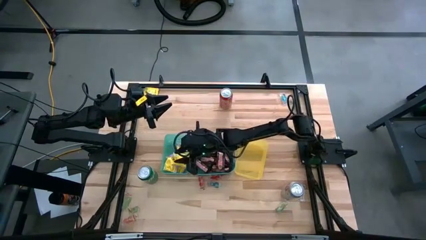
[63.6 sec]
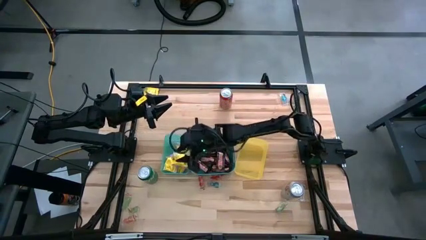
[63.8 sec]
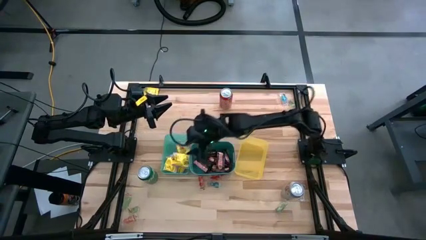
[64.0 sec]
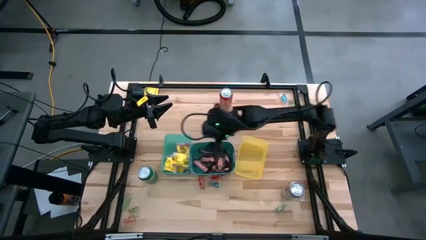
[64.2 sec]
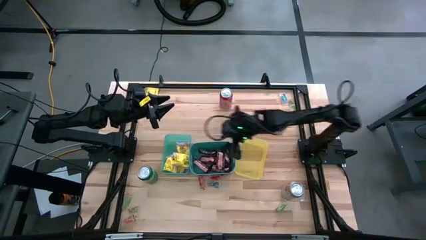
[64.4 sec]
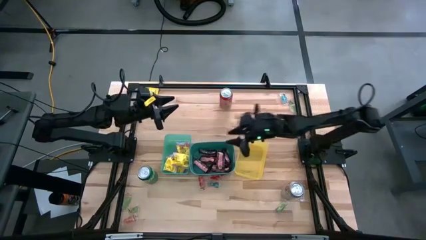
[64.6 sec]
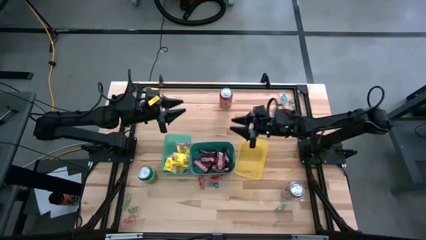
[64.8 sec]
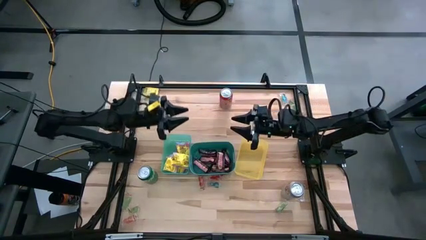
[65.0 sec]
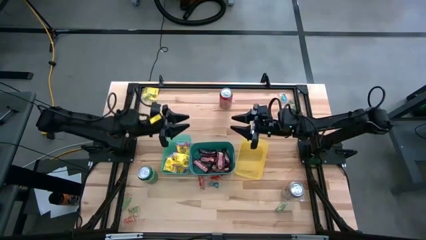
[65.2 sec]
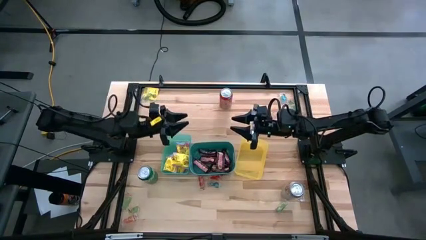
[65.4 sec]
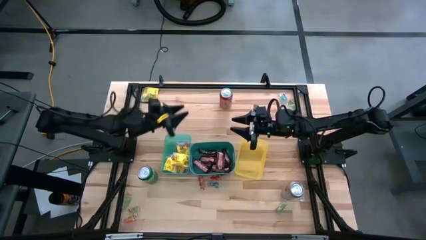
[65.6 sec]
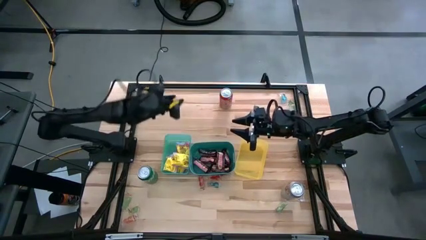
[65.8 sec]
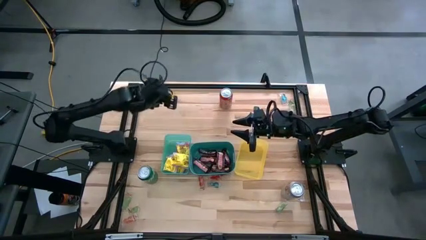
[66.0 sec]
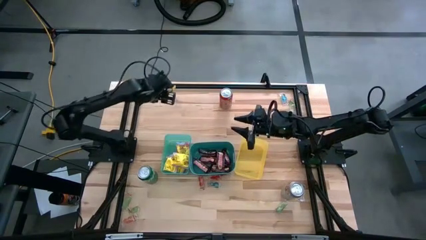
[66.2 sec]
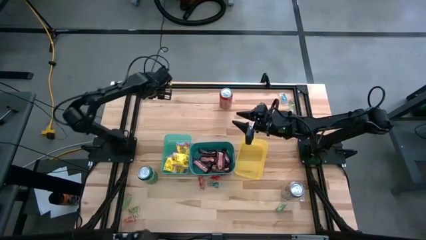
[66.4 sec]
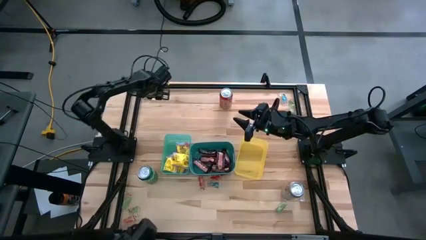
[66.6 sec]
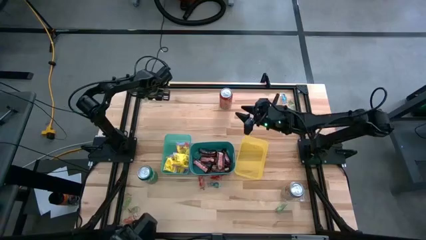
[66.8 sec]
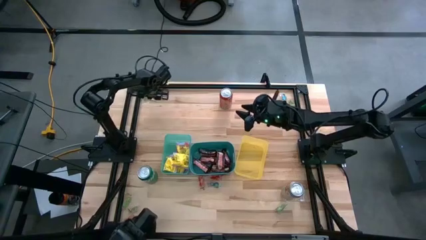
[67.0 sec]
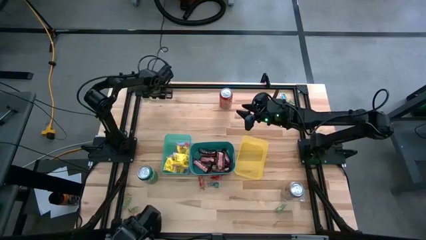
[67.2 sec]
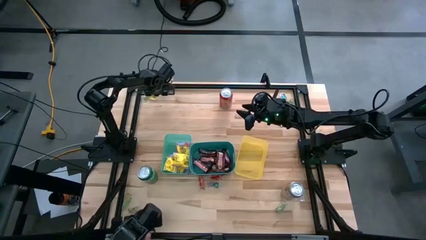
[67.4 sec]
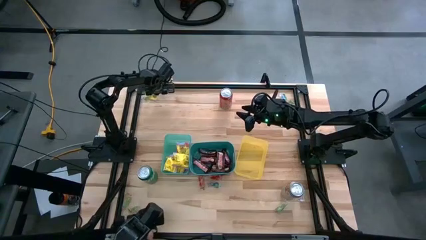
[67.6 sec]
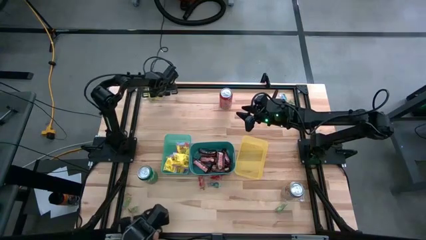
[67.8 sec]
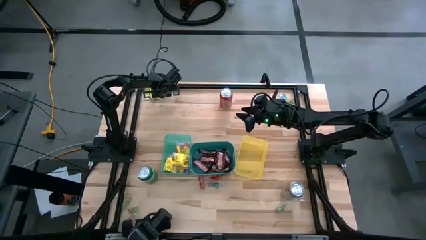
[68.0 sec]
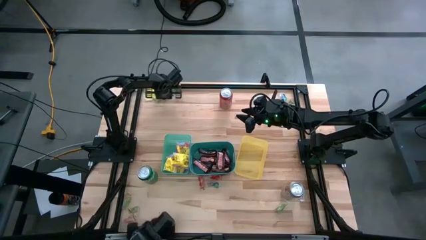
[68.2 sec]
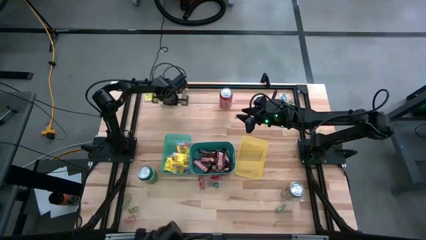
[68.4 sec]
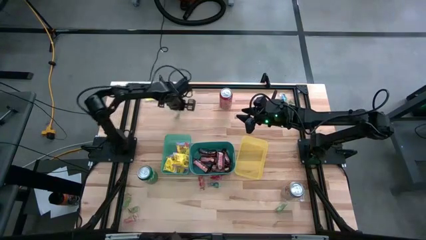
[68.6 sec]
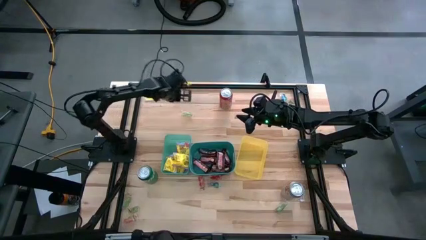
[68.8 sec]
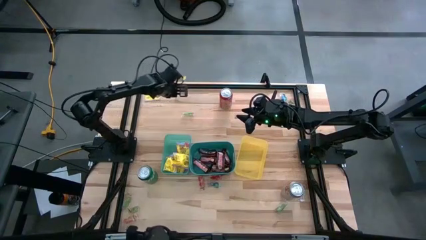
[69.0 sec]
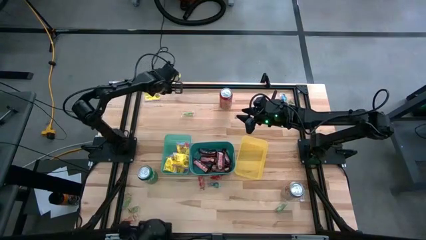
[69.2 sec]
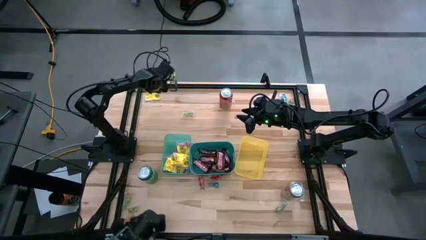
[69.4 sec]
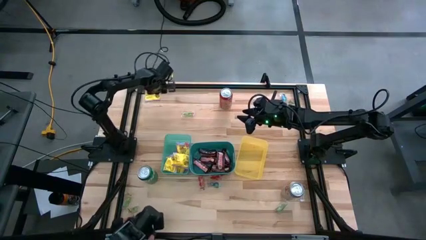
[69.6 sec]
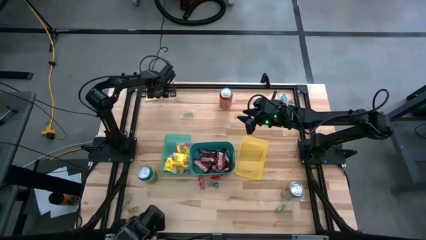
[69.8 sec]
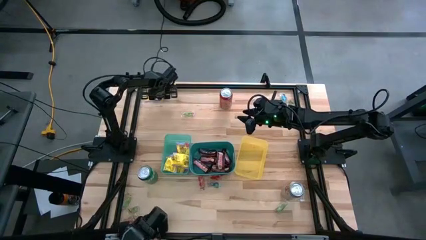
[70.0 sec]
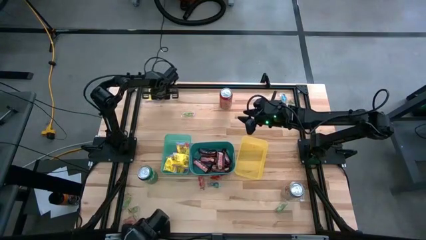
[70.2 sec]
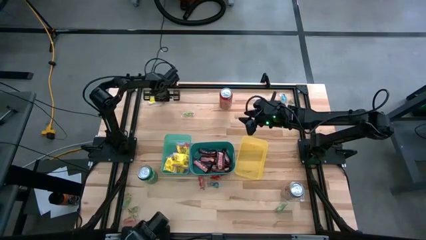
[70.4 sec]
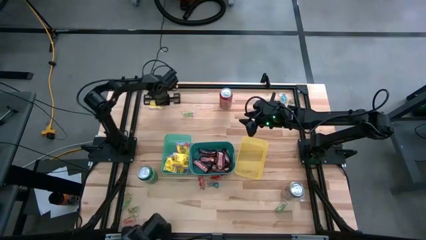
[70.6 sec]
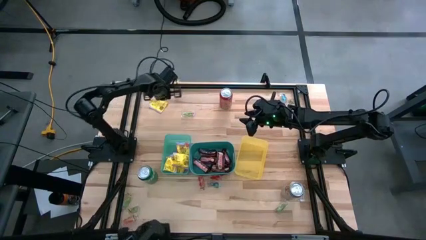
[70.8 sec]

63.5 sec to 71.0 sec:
Task: Sort candy
Put the yellow candy into the green bin

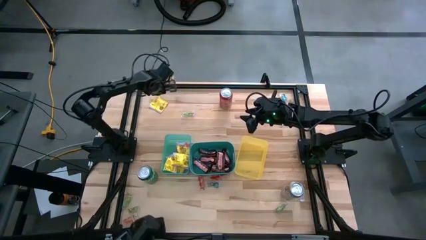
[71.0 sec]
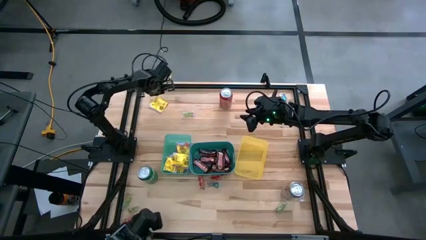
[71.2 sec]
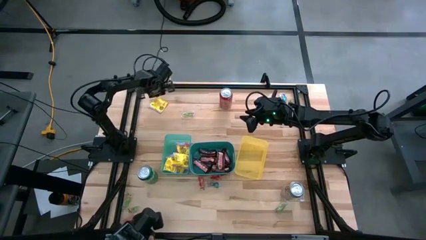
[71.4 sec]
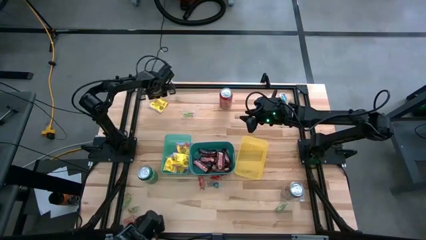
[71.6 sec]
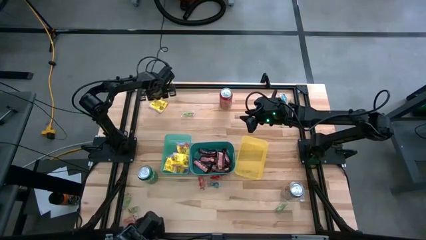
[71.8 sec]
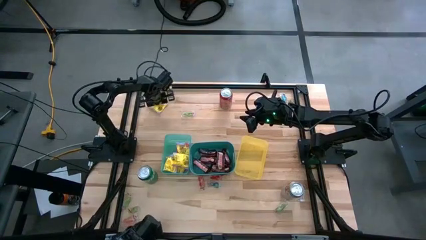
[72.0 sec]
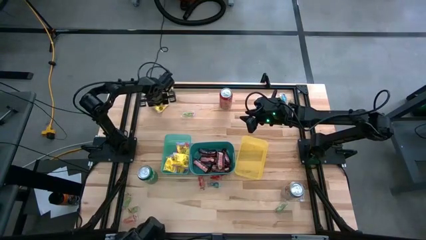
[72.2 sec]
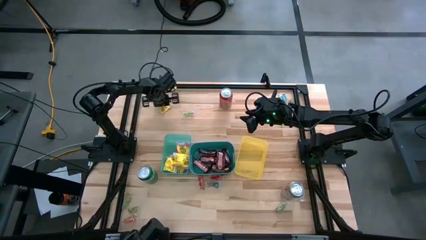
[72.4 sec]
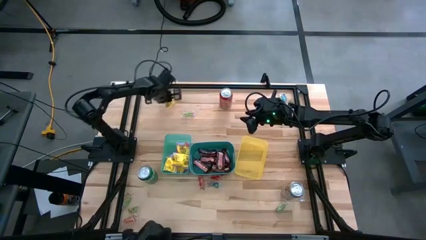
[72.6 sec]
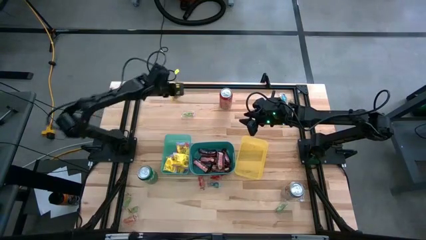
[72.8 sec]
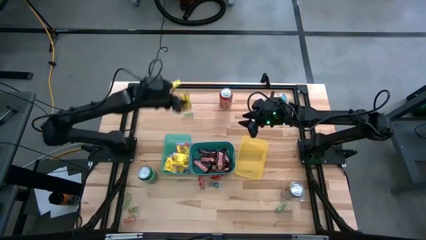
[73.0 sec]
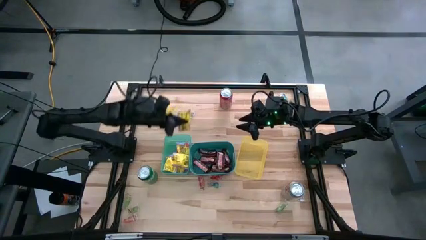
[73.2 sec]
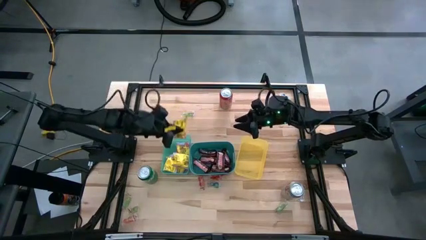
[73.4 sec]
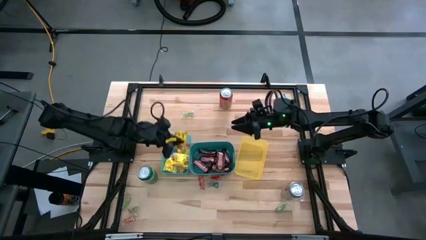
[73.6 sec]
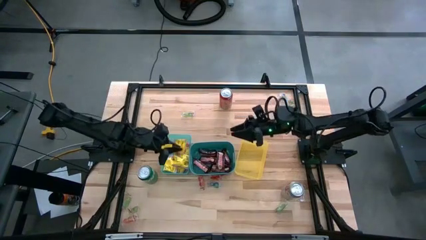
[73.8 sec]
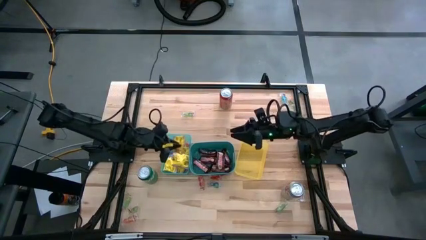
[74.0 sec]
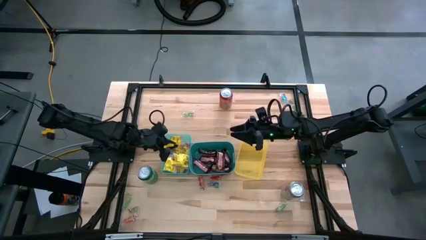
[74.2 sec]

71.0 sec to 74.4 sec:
Put the yellow candy into the green bin

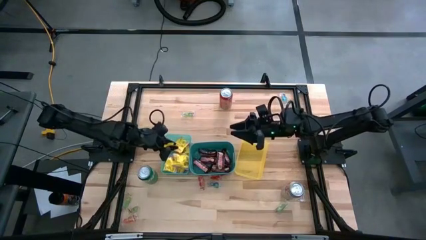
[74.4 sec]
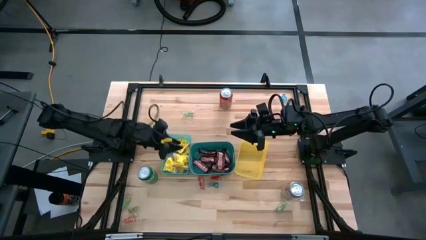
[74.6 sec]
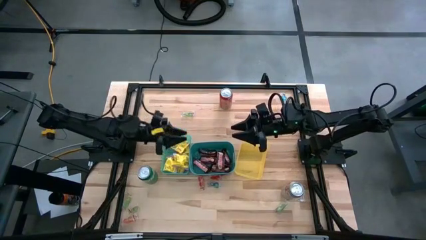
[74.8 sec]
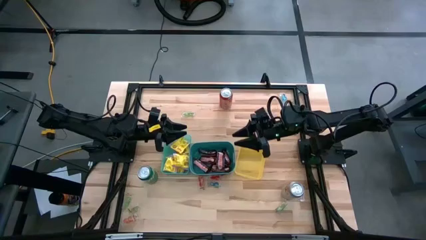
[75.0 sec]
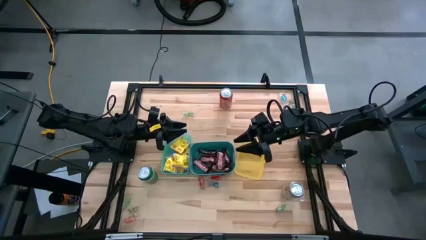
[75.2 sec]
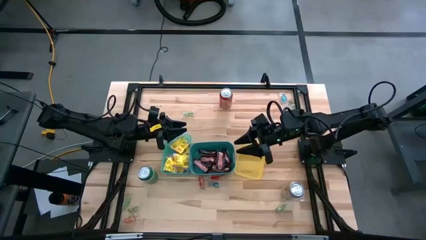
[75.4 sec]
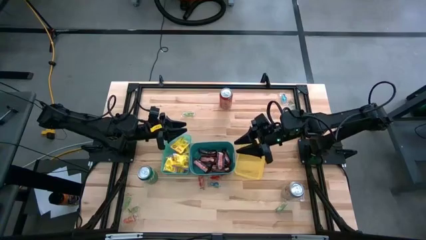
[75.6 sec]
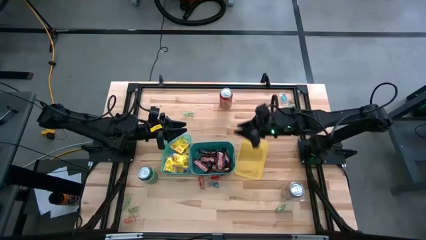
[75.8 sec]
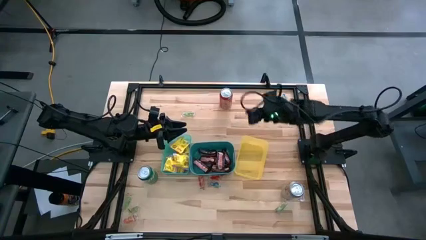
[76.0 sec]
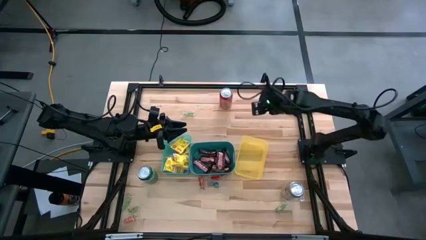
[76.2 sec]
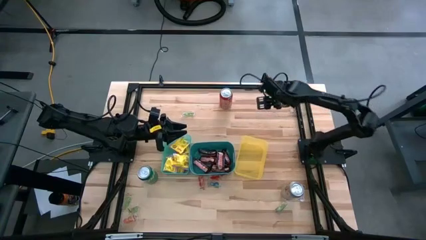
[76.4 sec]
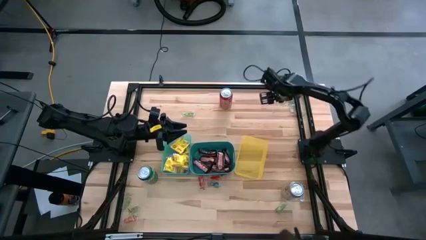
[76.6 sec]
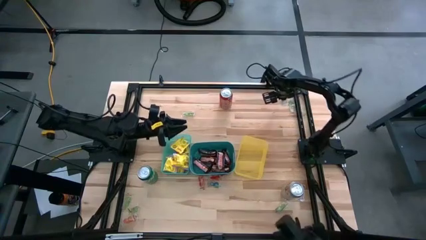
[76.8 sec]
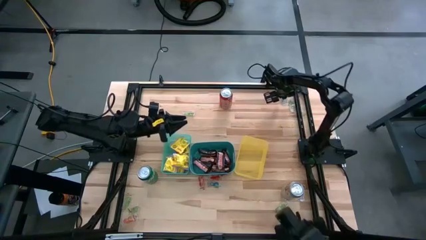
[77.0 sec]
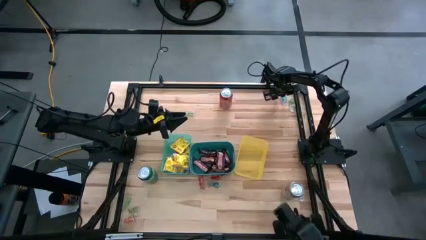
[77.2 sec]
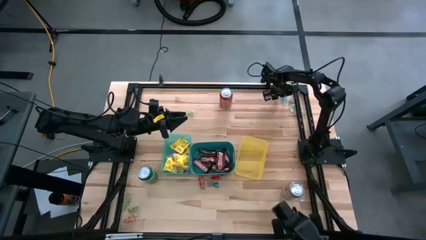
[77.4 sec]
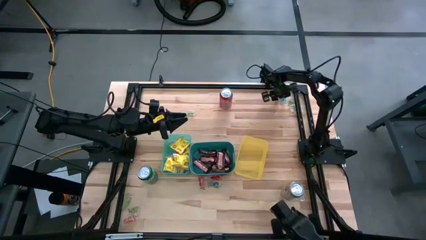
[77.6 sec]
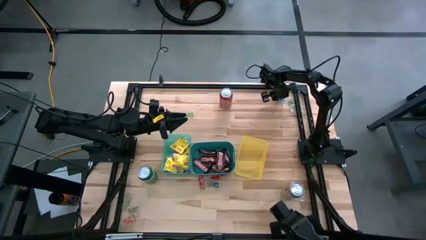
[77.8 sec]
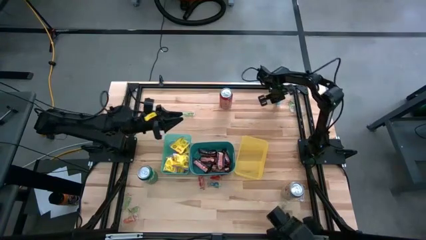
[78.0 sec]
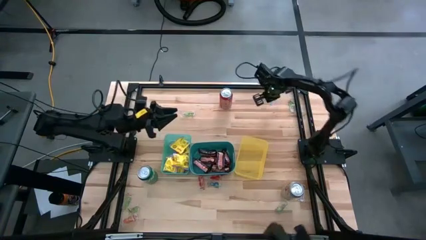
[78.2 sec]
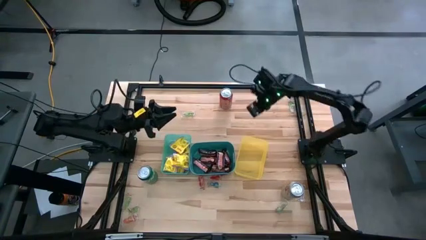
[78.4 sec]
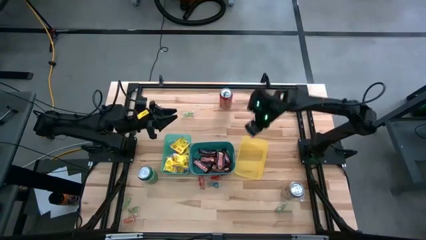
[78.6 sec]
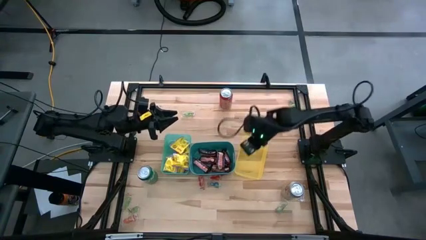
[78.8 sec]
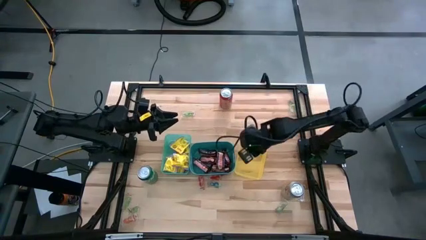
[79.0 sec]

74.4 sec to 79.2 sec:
Put the blue gummy into the yellow bin

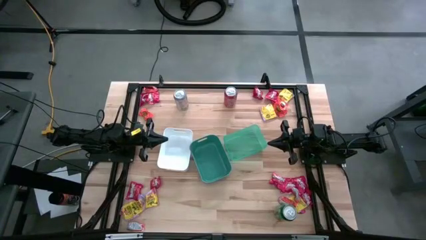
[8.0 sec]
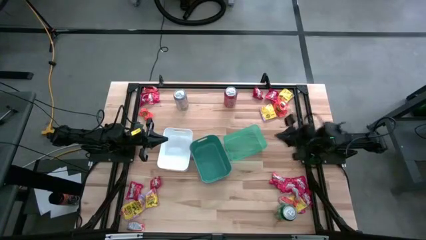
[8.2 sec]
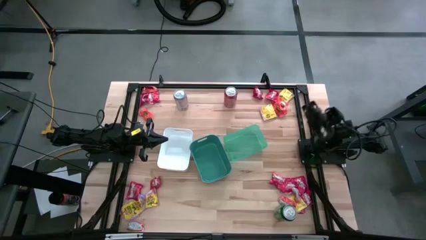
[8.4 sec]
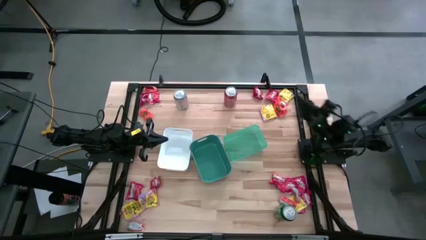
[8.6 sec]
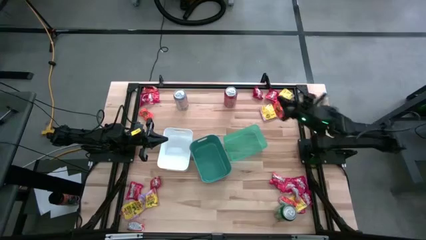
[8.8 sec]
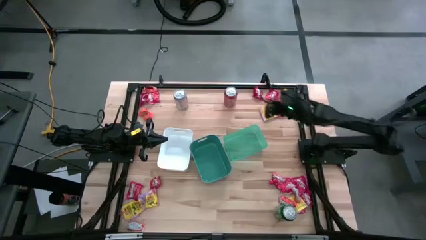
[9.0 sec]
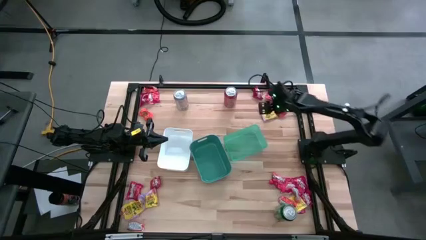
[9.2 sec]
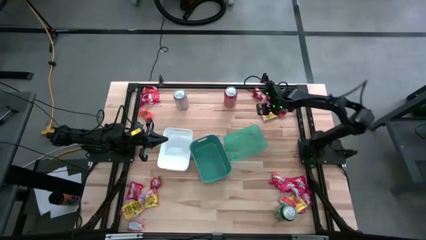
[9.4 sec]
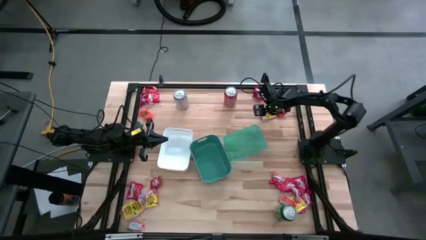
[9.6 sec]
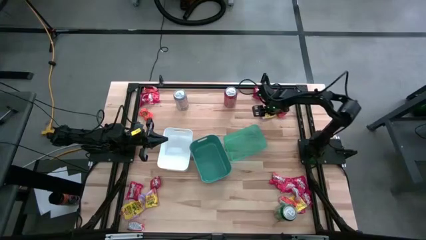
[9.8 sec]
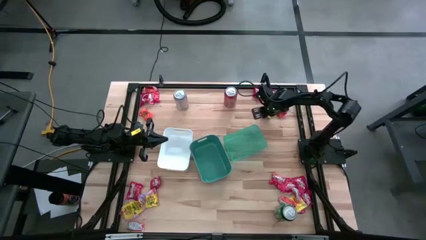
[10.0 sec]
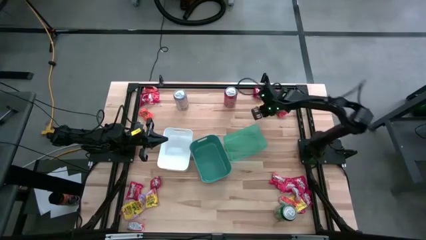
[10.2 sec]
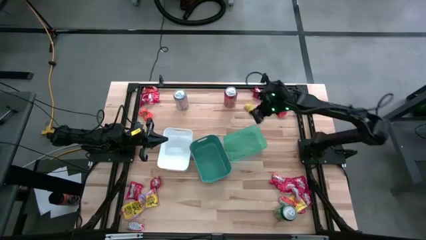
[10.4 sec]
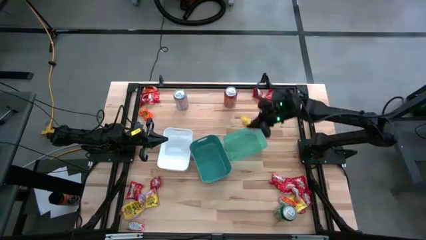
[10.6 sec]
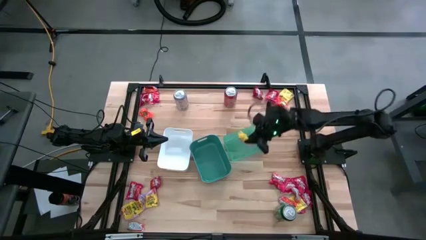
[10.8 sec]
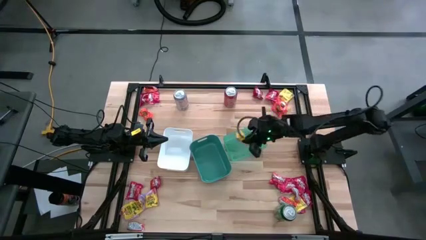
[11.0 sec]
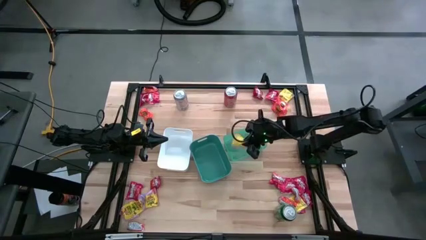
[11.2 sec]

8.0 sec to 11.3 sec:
Task: Sort candy
Put the yellow candy into the green transparent bin
